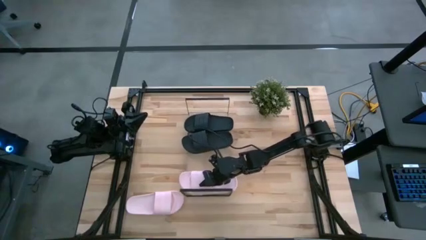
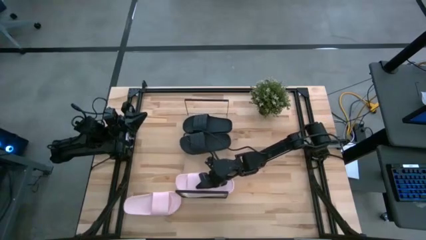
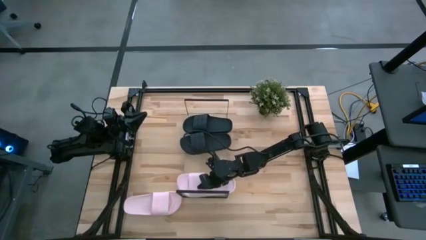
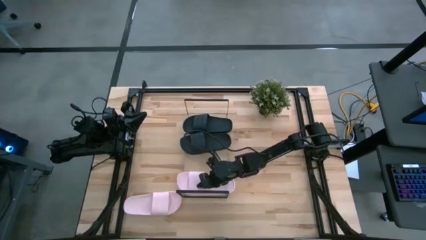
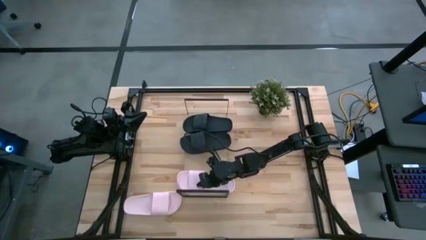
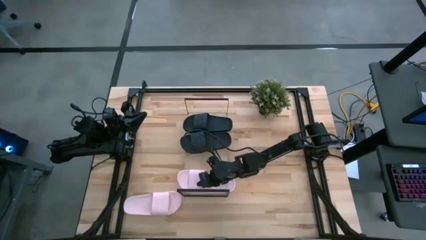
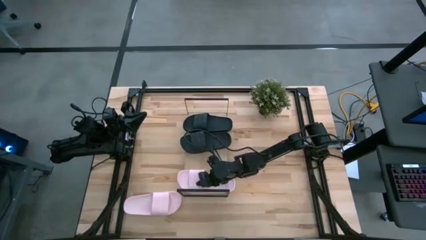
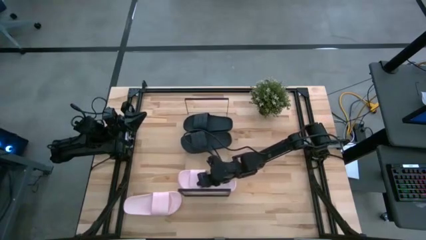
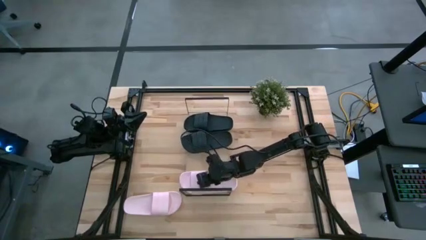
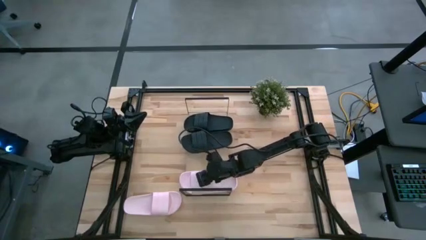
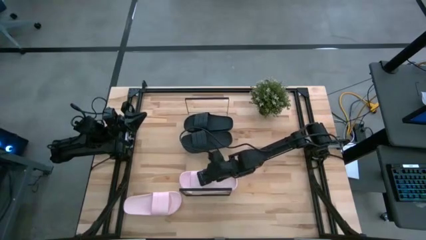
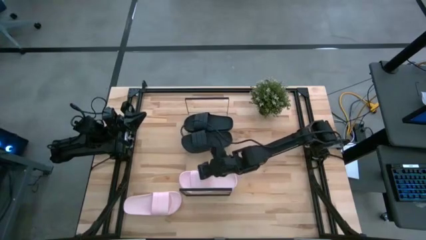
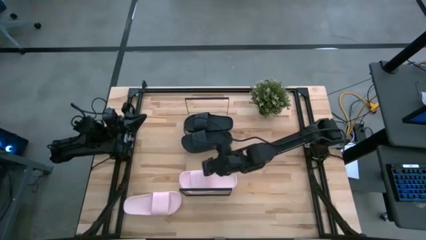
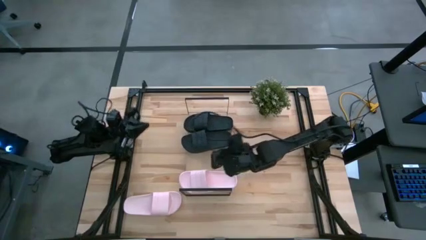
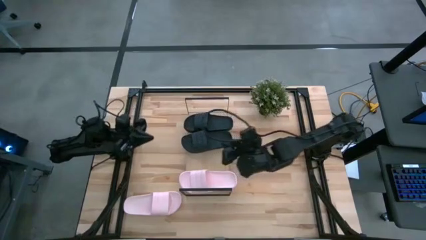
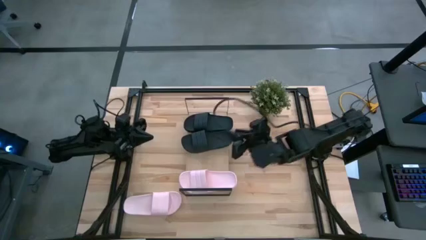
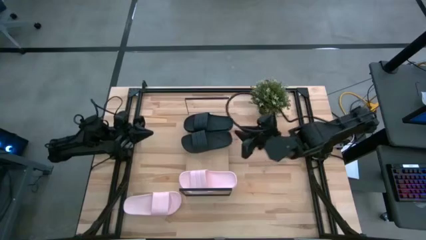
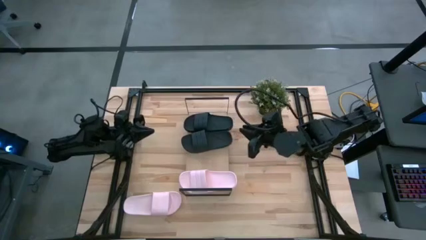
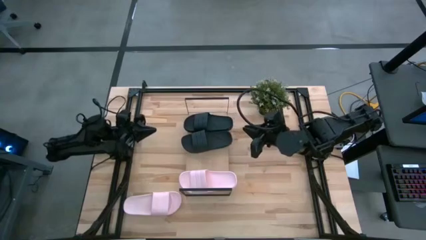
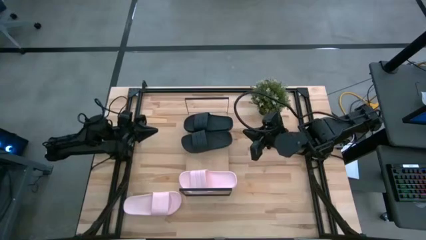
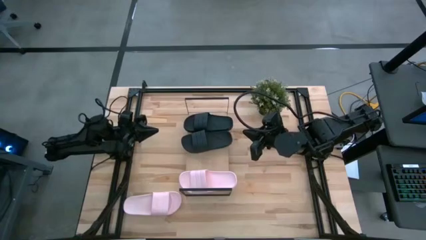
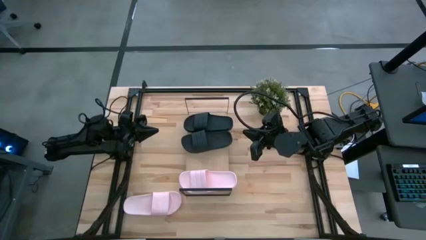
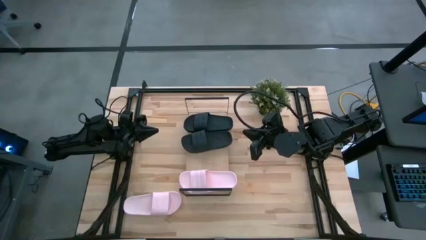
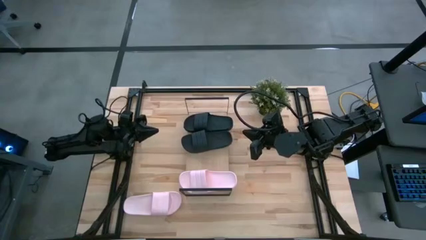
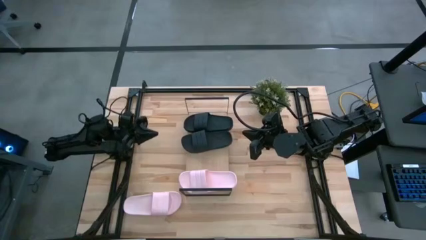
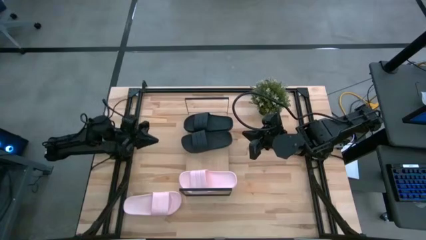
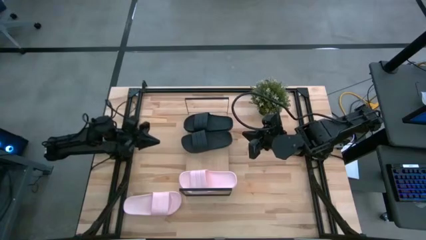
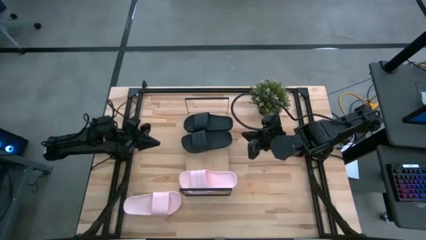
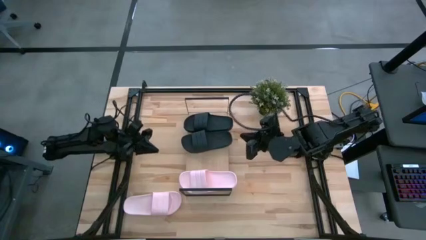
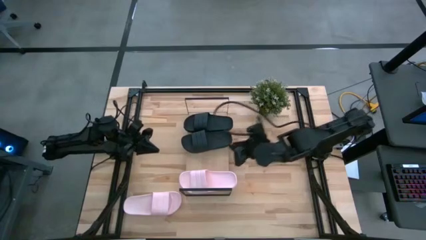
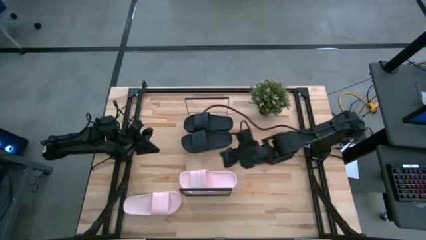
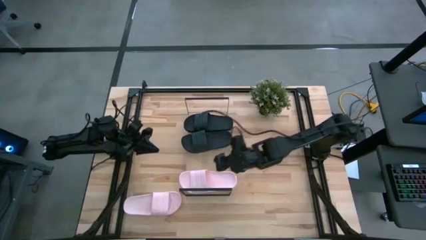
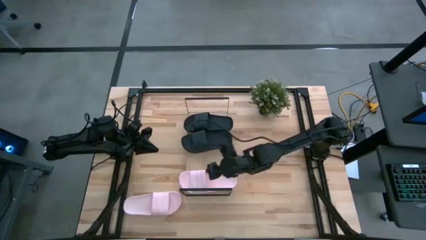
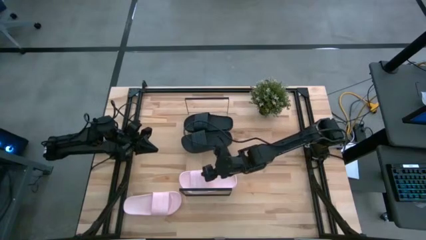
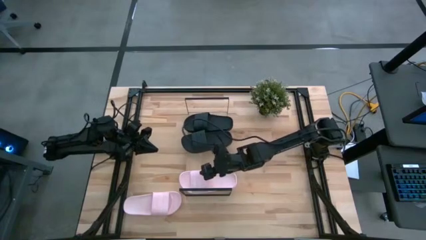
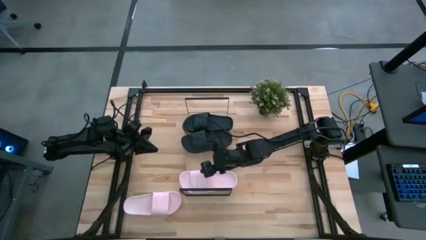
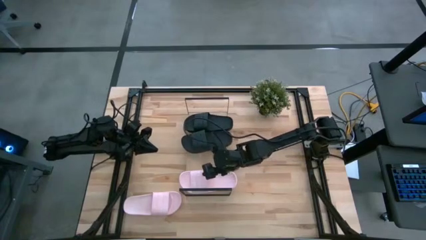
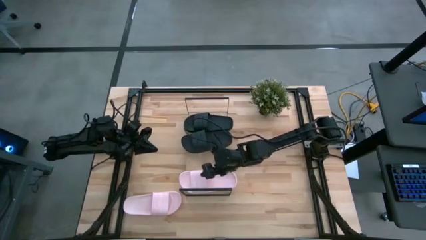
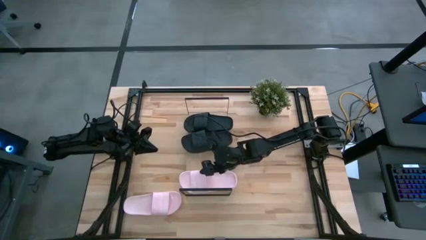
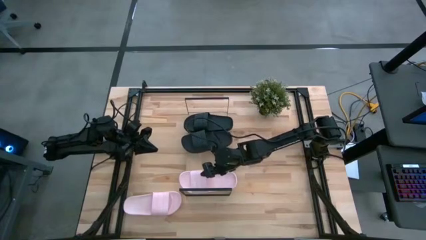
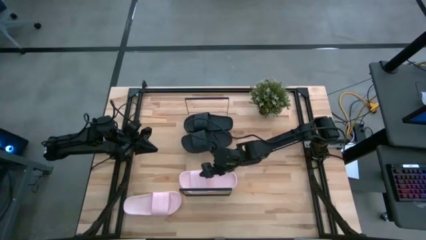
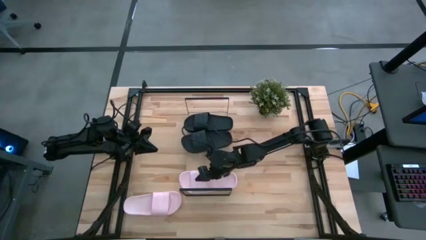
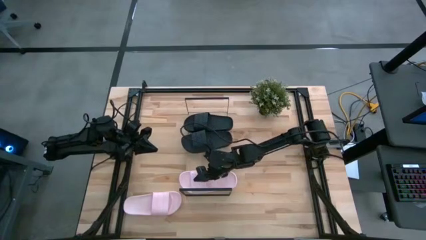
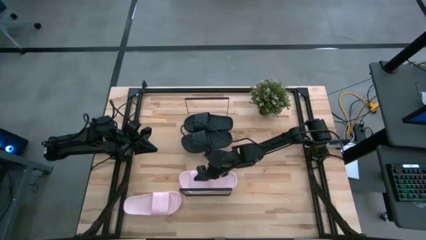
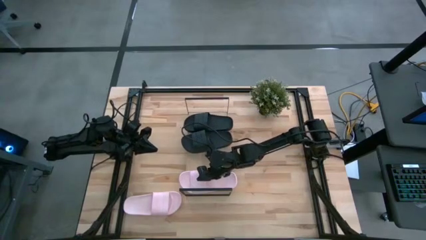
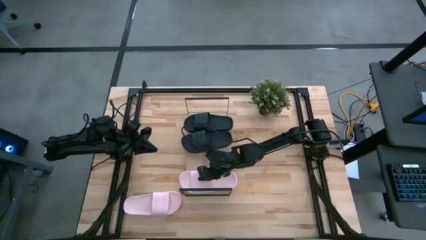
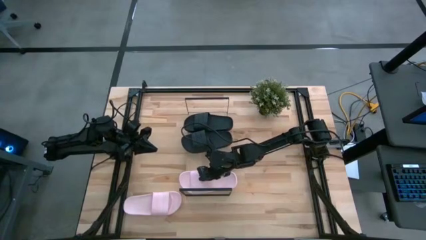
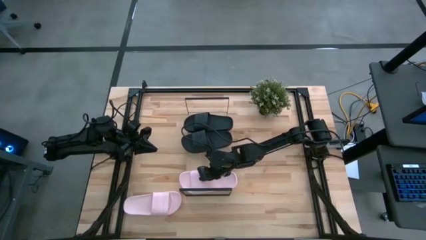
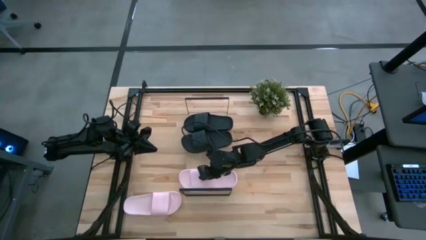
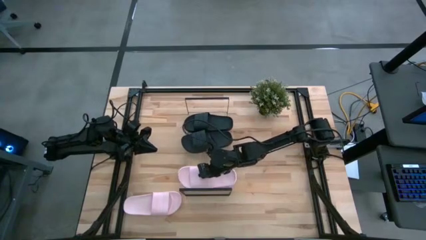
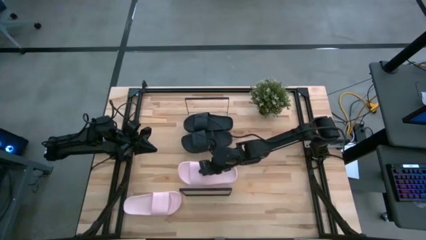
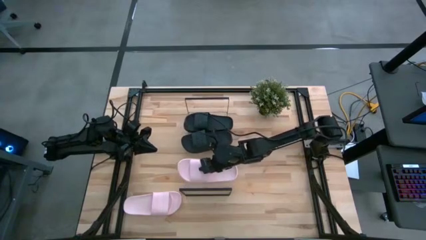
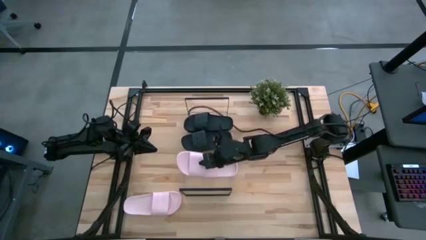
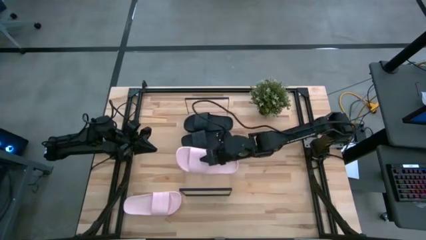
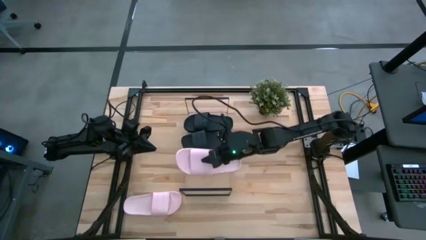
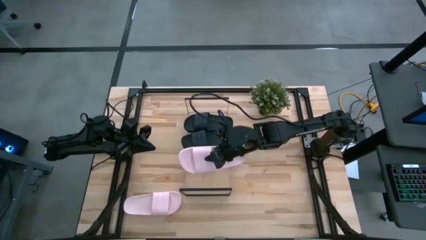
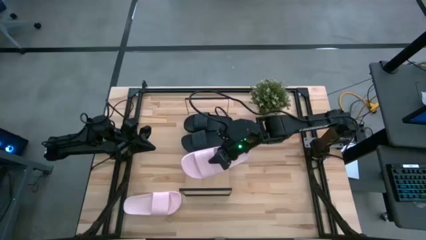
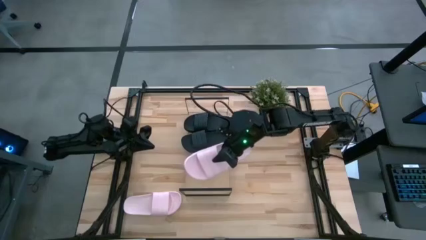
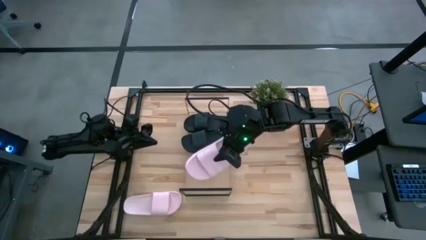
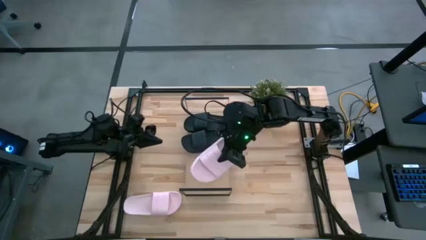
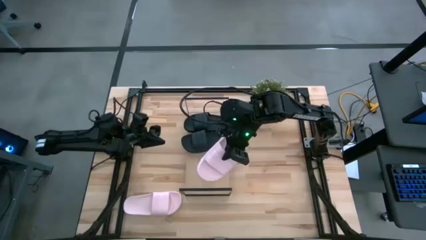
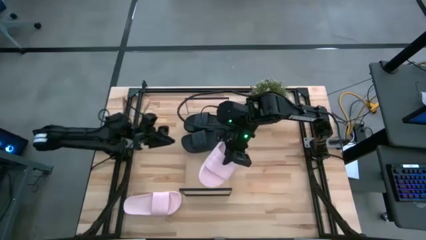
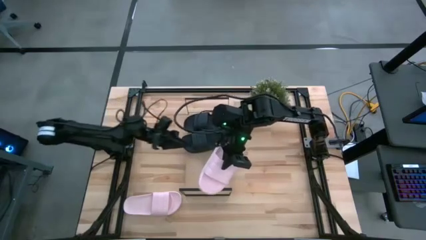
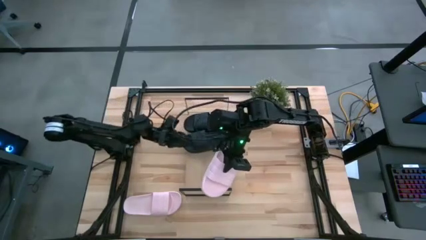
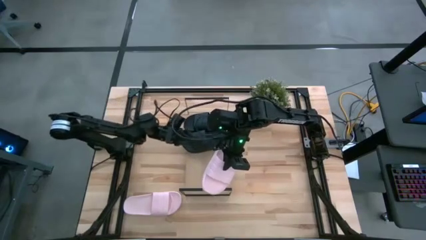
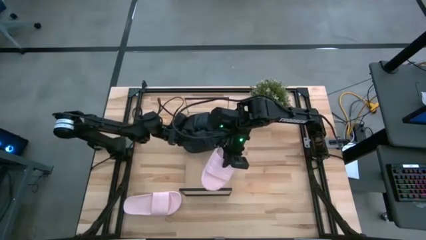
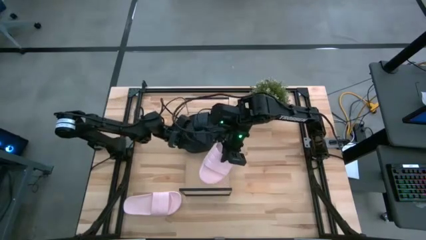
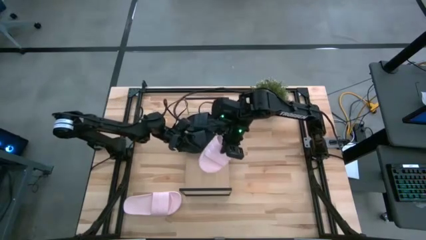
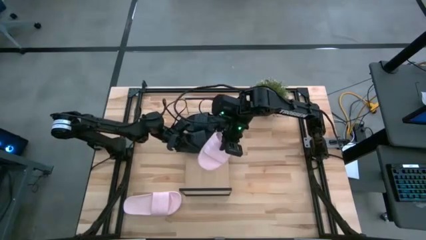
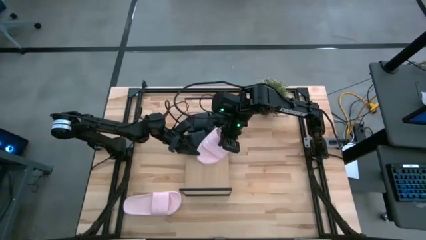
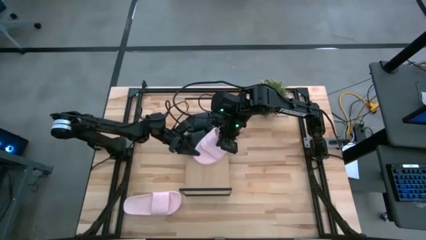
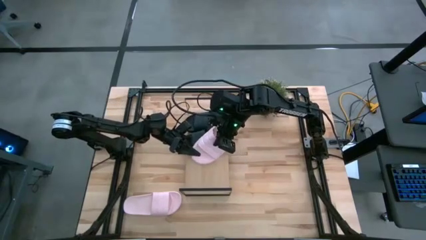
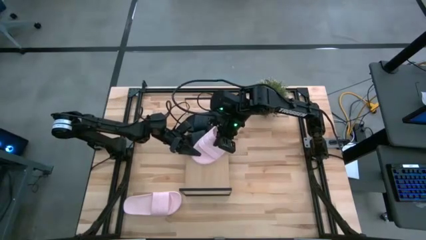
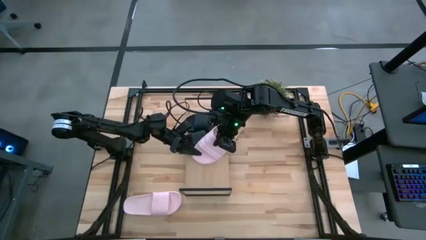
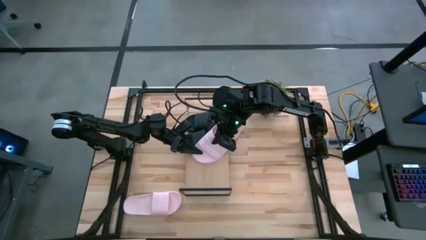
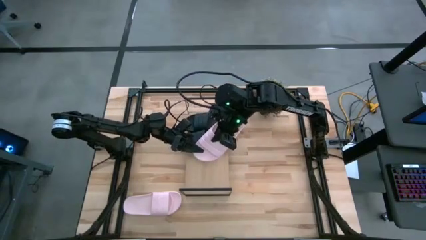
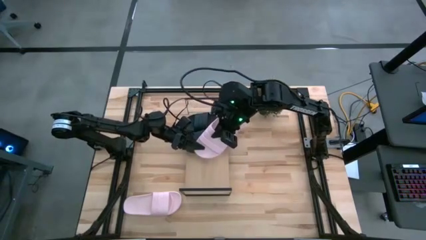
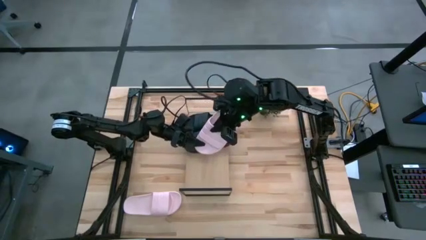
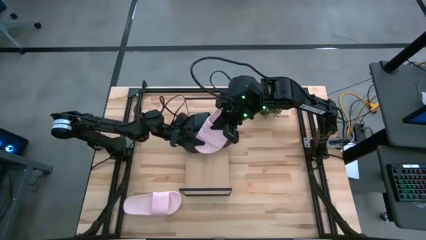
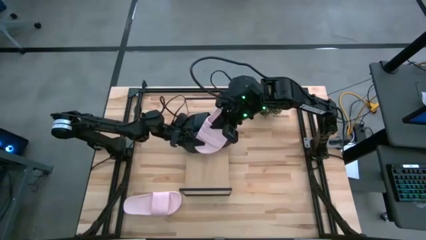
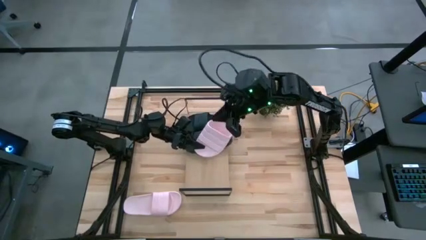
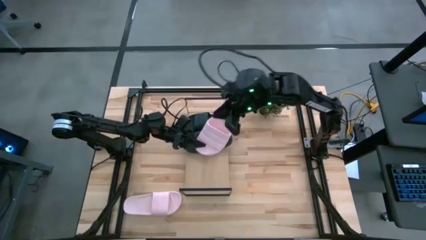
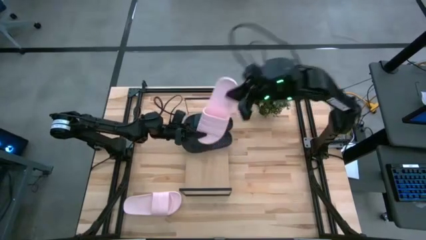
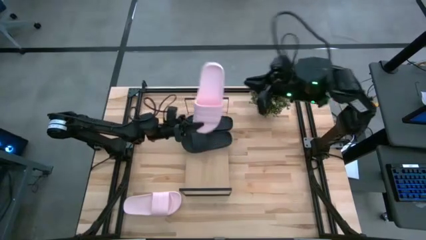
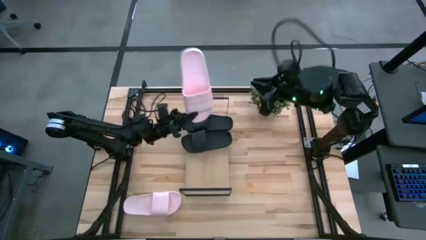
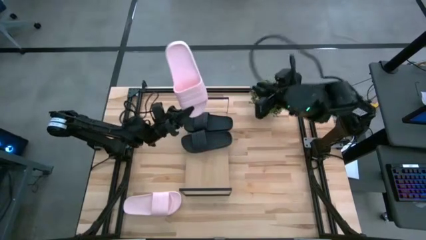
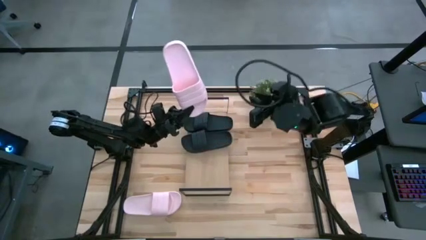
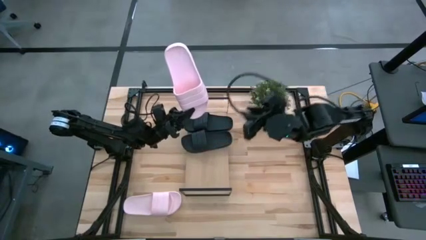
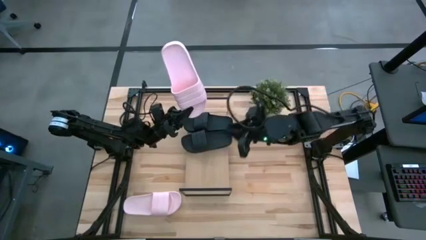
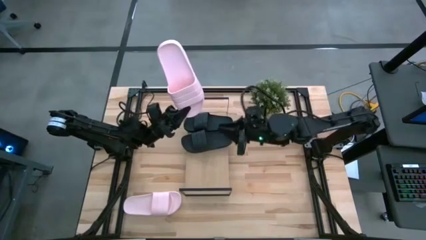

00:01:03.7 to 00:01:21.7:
Task: Pick and place slides into the shelf
Put the right light pink slide on the shelf
